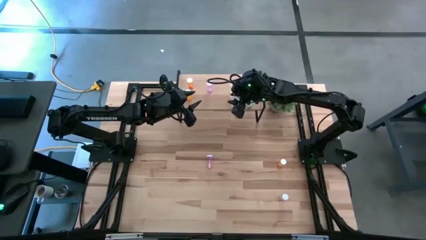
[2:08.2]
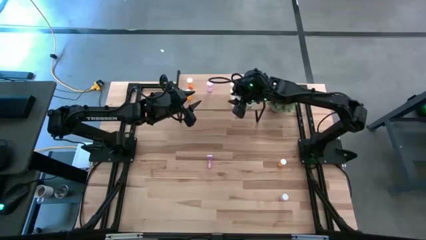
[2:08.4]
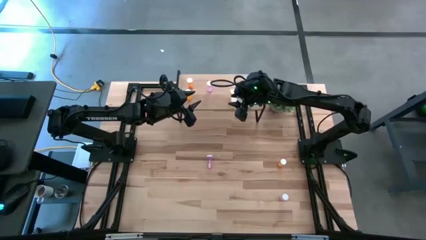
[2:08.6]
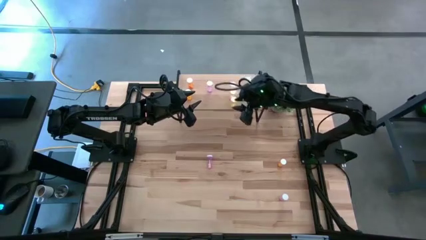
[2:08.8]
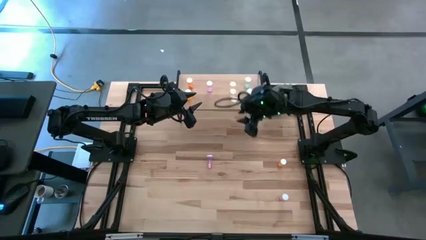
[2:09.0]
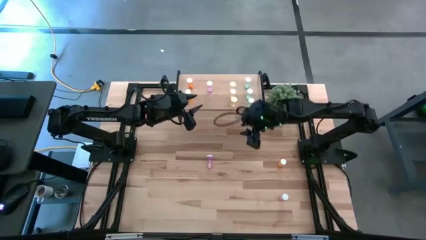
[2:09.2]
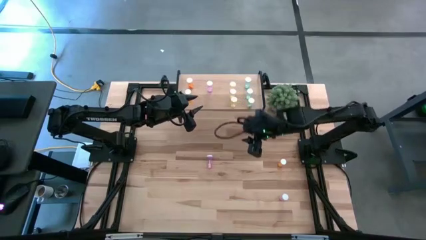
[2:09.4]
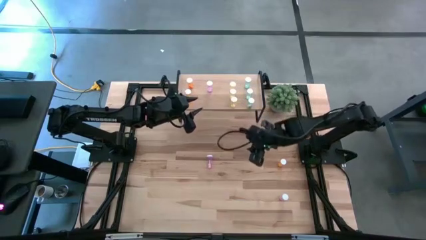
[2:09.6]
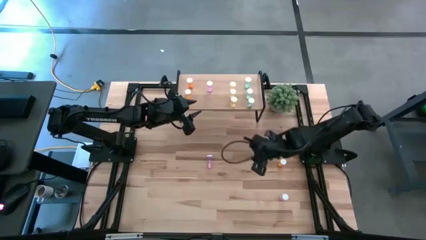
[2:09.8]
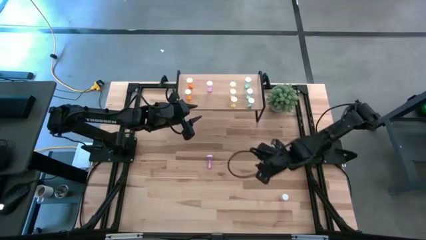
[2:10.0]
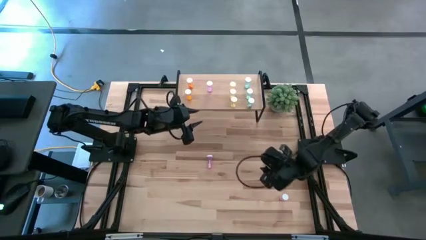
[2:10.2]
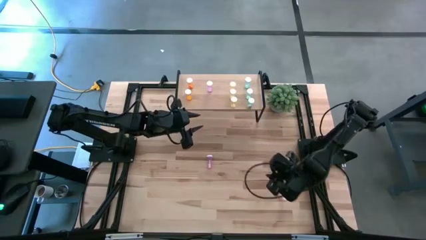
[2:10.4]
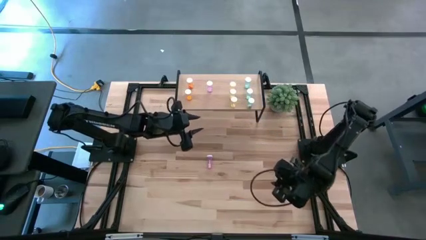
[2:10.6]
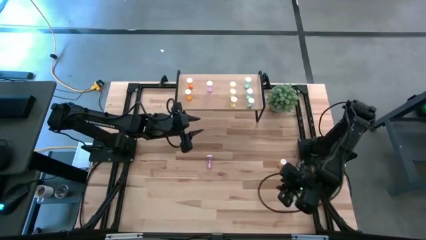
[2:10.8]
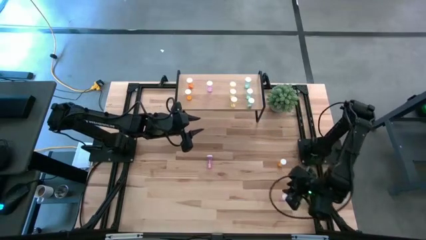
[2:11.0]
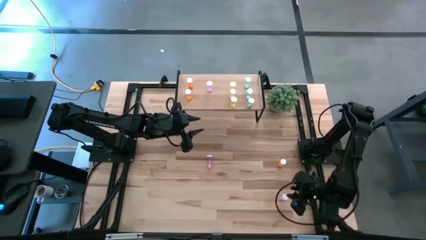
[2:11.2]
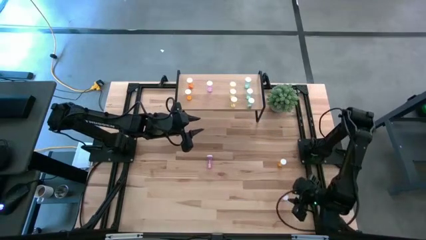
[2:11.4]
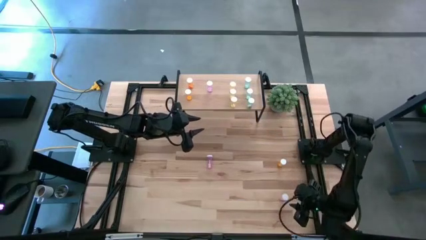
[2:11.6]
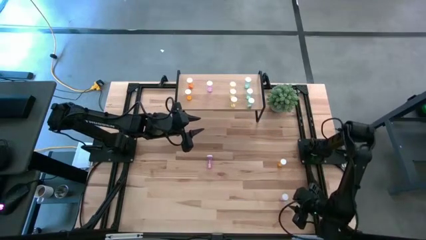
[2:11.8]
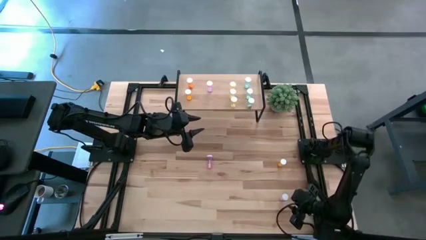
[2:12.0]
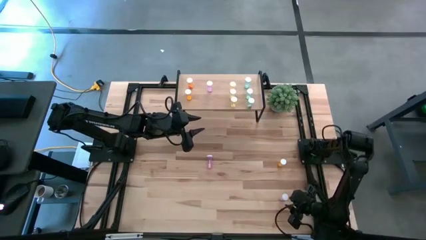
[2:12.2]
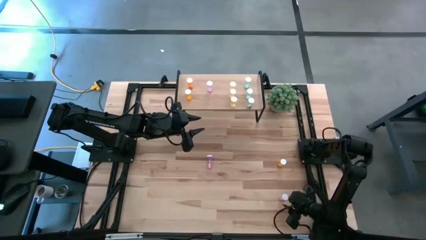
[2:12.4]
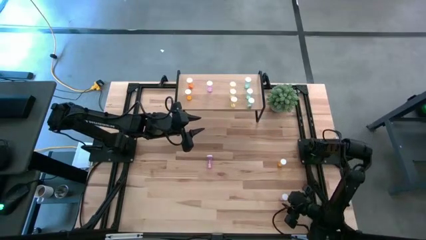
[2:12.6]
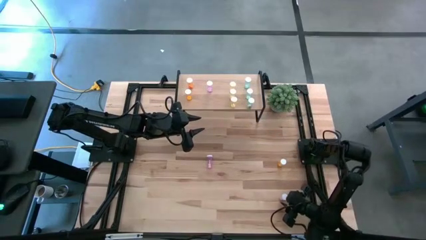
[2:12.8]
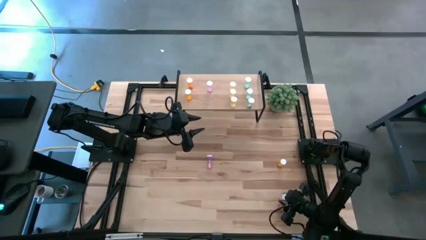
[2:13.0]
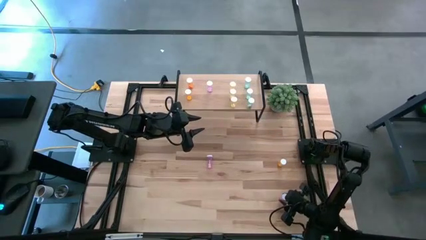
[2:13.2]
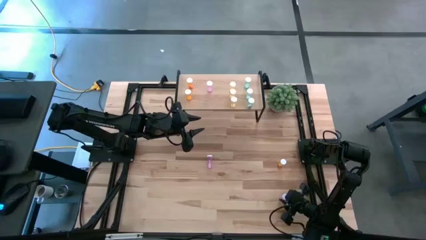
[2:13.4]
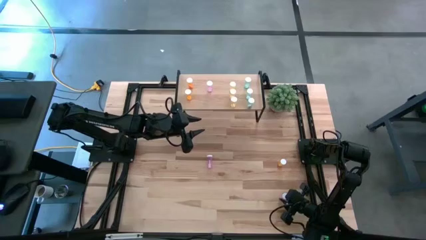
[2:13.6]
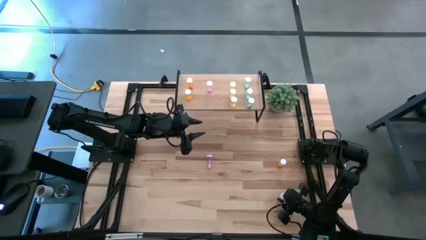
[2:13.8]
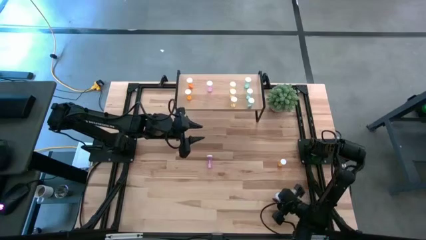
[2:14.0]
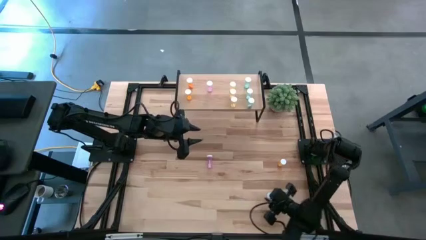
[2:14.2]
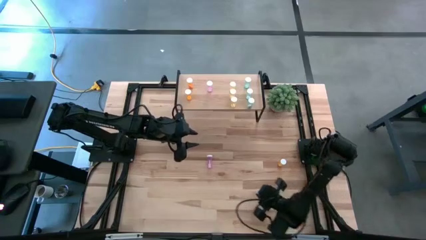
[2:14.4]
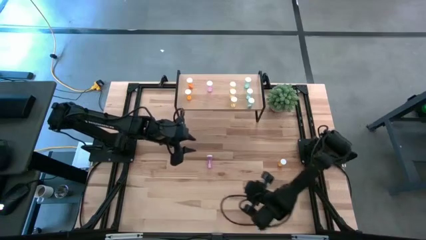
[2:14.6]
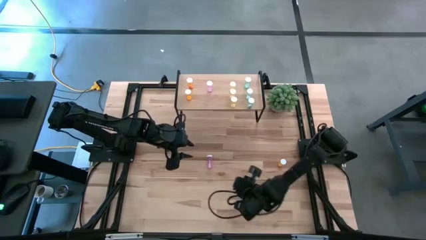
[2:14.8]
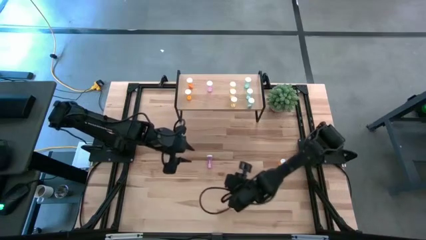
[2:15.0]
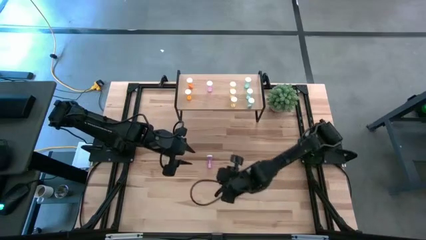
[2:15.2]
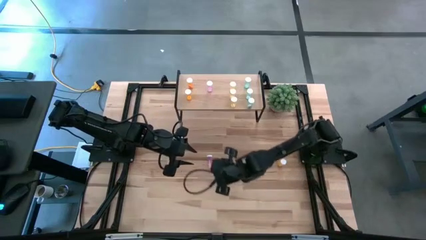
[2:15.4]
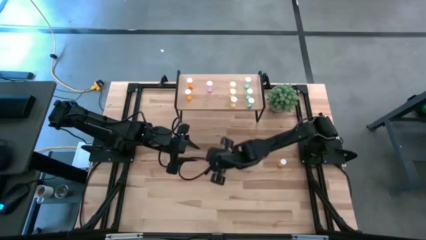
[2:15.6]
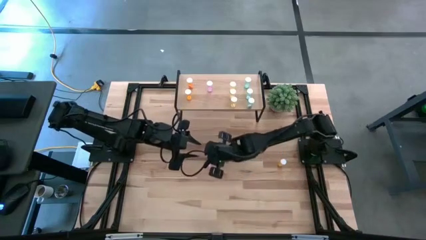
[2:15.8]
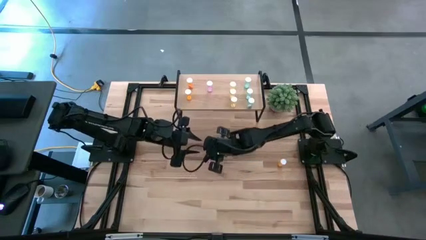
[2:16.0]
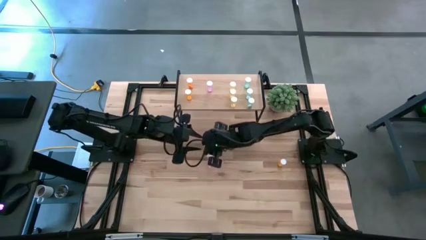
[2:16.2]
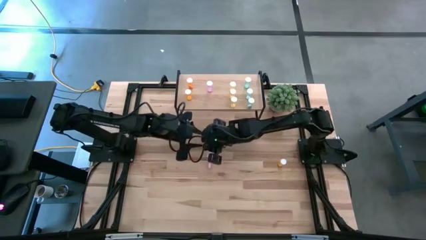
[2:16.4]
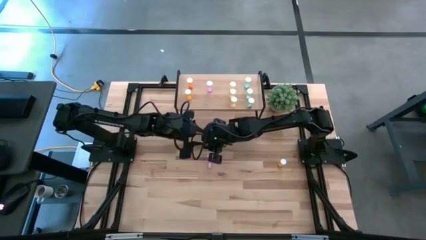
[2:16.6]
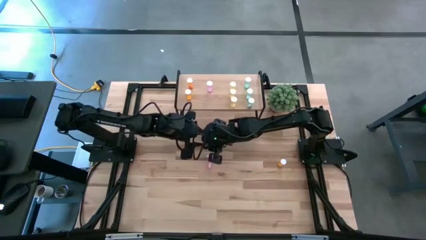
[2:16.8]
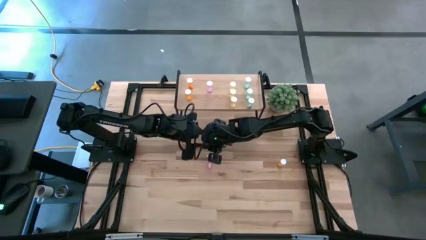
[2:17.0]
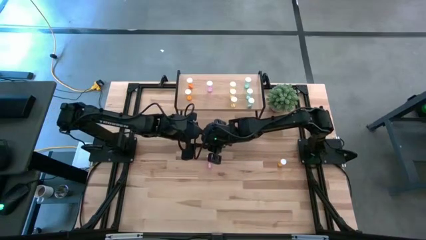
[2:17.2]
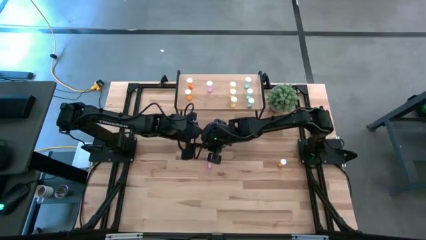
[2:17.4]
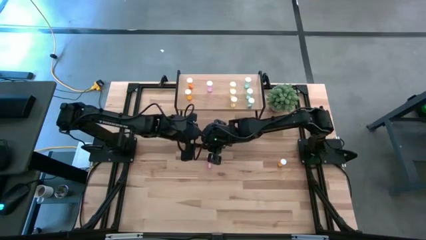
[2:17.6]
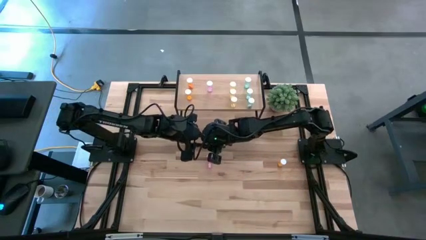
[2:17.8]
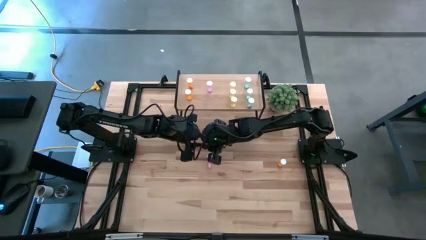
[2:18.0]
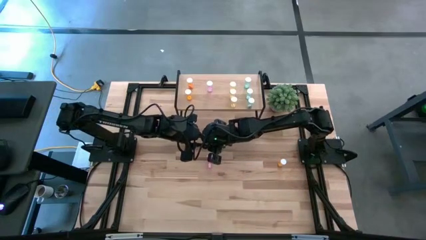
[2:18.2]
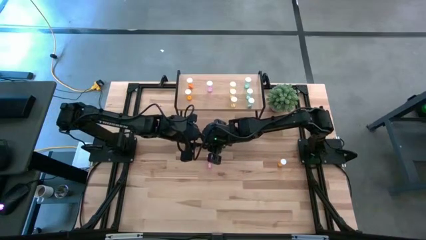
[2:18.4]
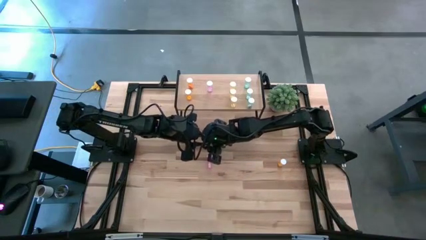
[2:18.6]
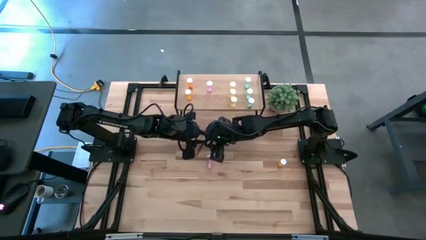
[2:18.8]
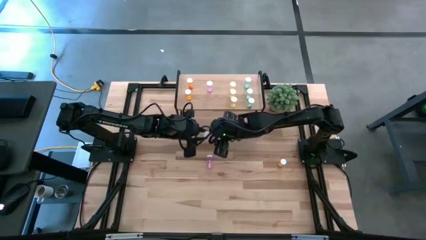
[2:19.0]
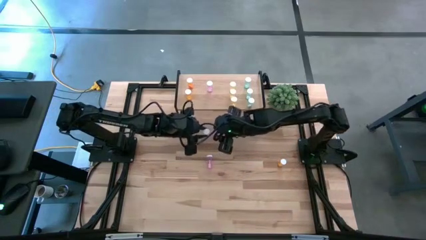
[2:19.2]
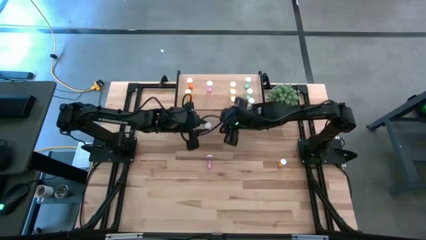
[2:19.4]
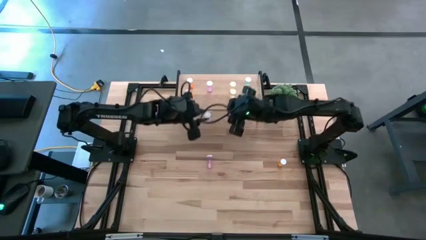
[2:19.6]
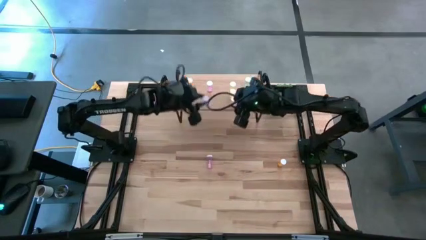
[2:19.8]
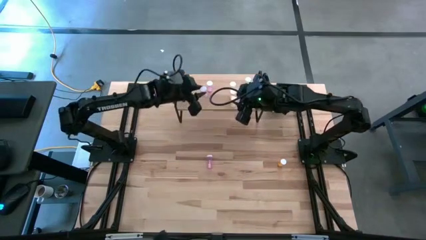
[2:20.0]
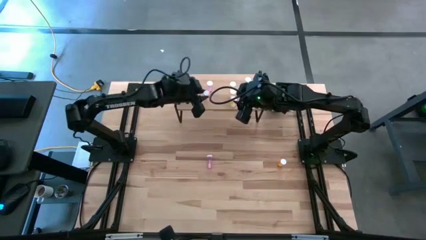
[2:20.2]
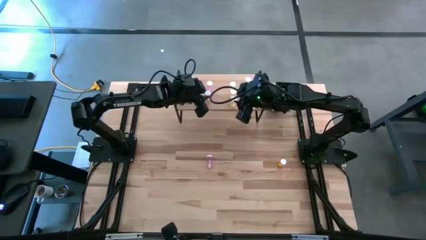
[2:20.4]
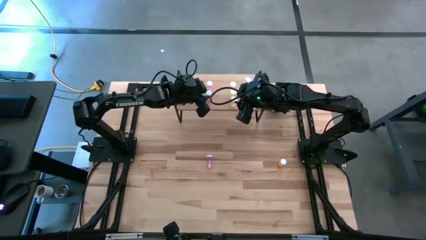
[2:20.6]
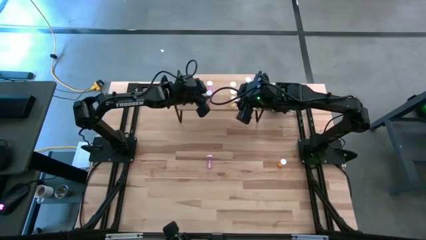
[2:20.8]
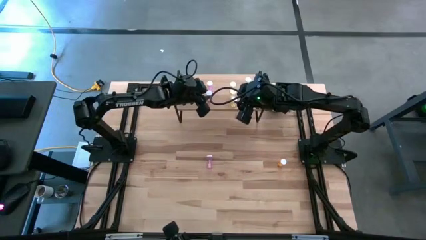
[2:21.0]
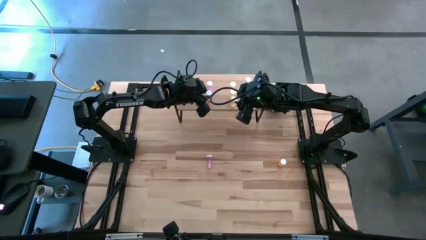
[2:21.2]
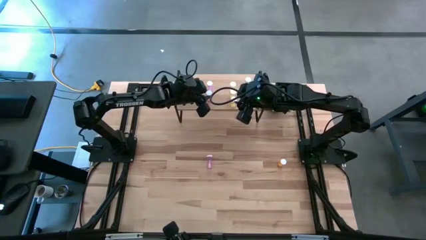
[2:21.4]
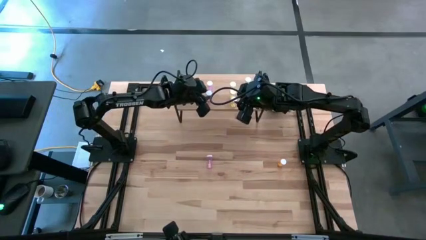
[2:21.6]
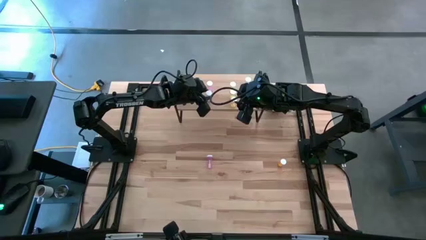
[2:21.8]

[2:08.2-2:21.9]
Task: Pick and place medicine bottles onto shelf by color
Put the bottom pink pill bottle on the shelf aligned with the other pink pill bottle

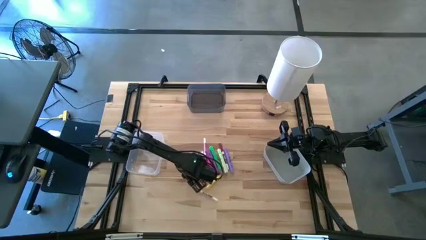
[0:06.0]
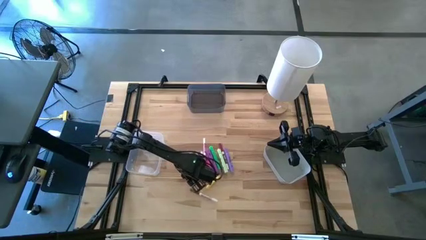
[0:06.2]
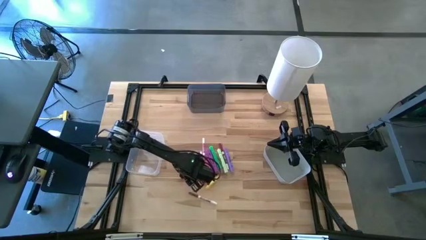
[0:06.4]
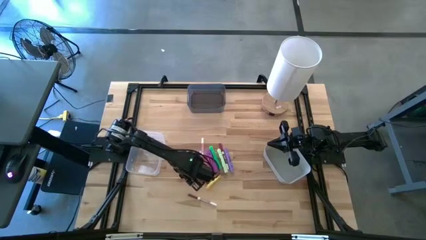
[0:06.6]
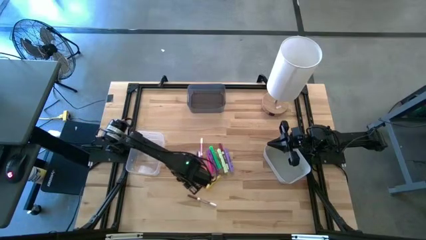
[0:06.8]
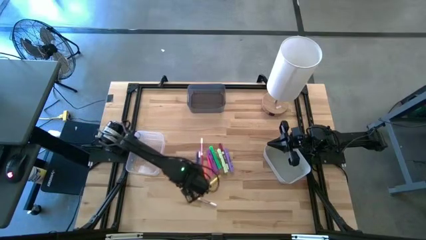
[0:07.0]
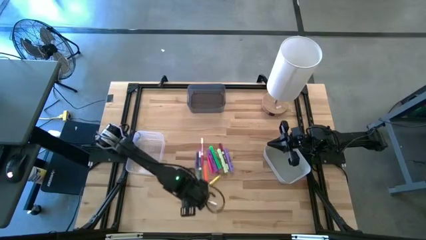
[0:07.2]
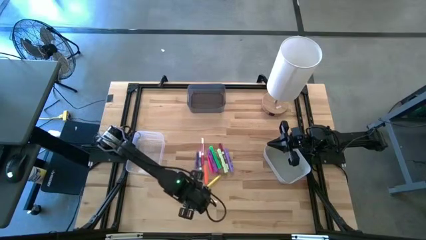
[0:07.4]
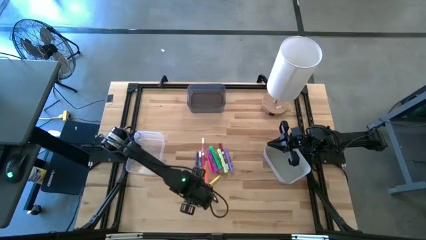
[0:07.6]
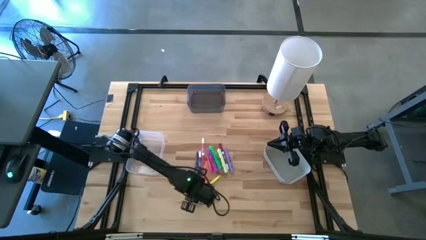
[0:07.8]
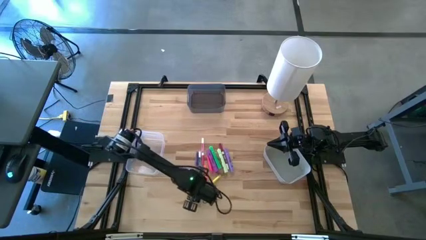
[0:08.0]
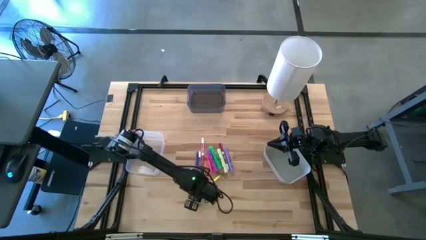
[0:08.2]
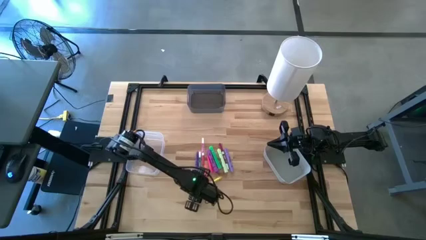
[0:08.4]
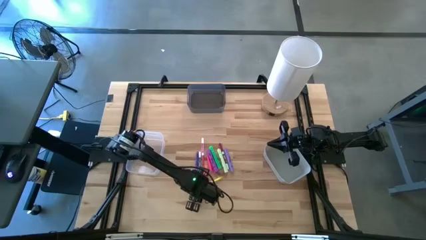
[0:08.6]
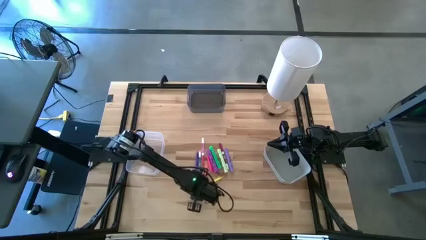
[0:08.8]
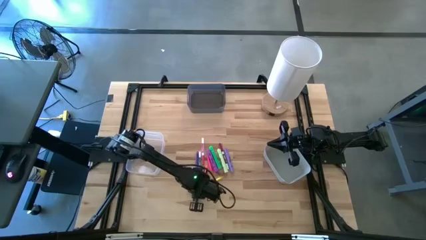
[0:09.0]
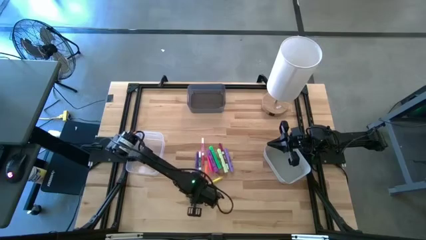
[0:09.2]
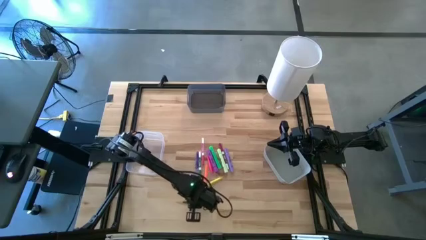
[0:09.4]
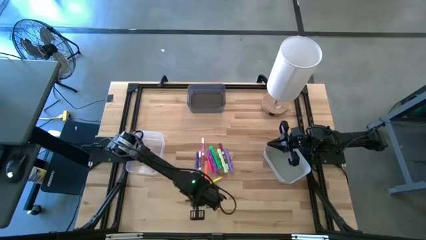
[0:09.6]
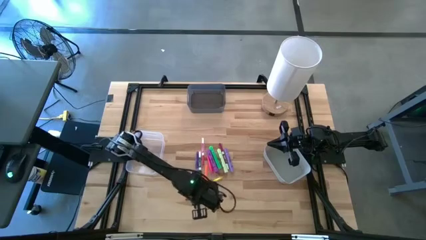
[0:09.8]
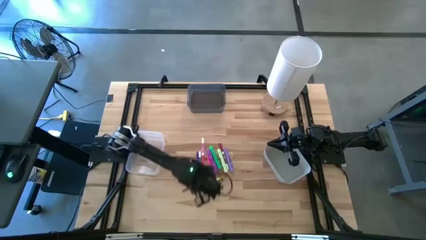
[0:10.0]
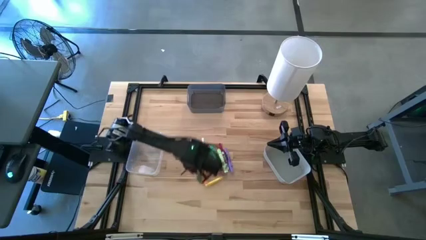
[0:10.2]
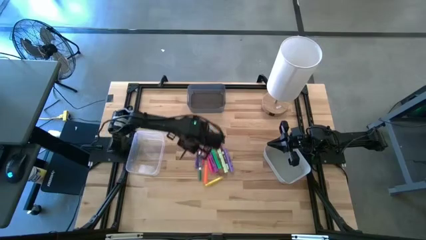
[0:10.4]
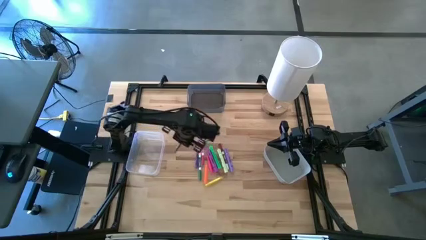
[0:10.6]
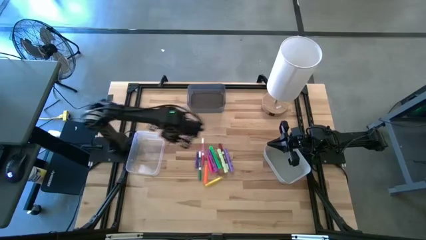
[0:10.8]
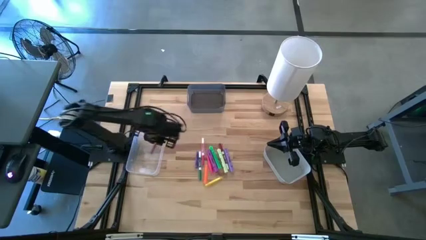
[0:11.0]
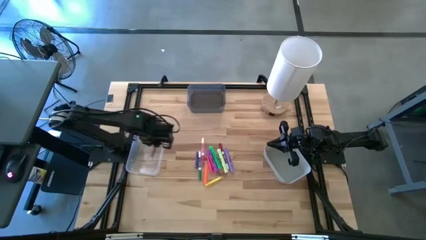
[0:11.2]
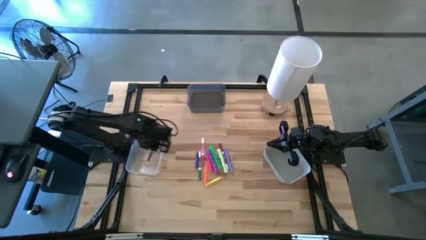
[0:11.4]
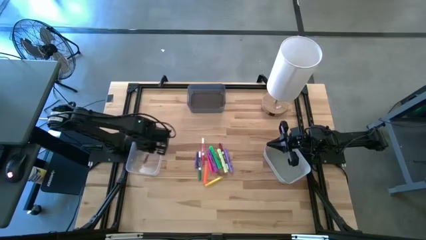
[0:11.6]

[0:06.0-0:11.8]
Task: Pick & Place Markers
Put the white and brown marker into the transparent bin
